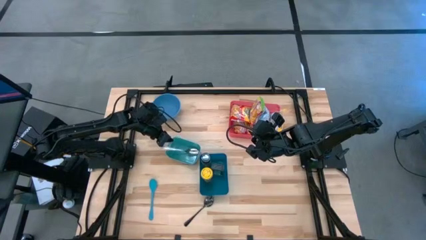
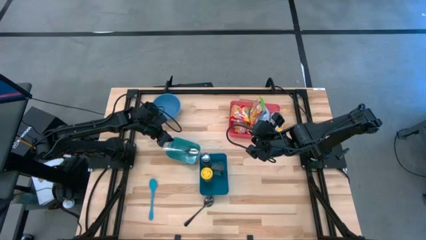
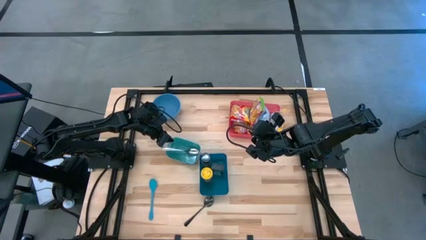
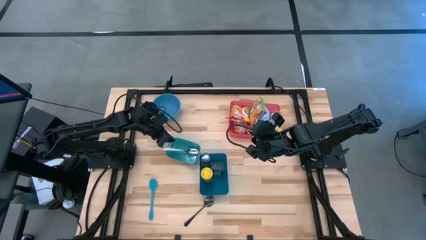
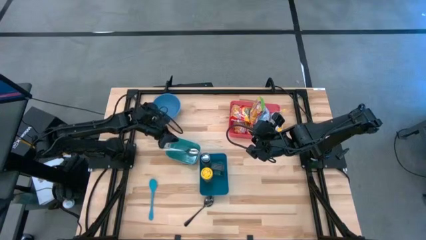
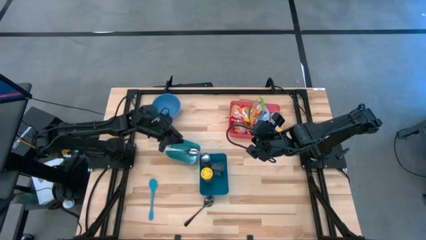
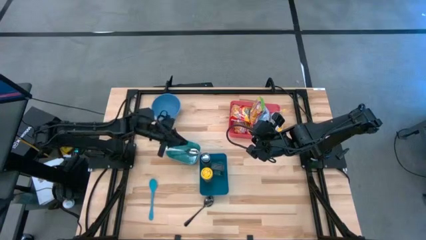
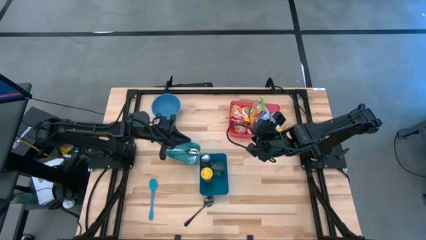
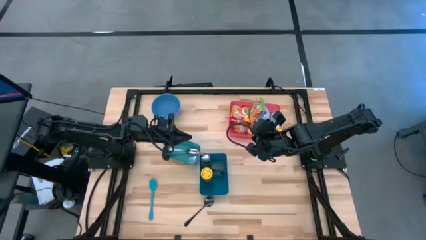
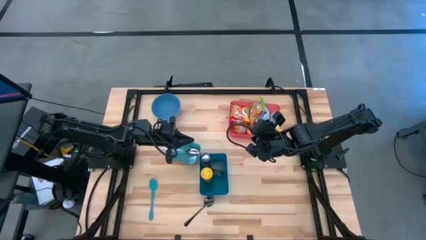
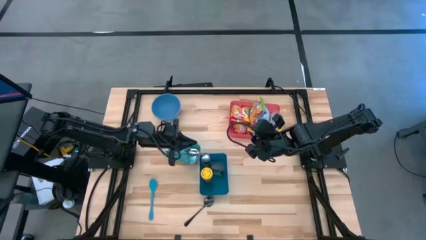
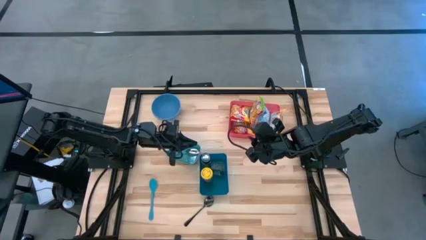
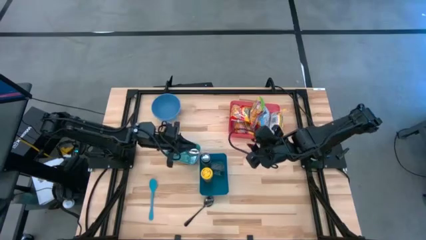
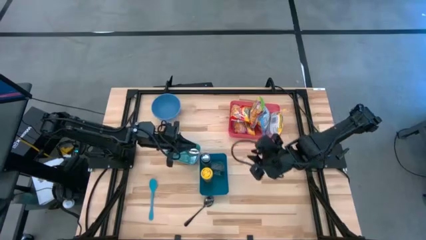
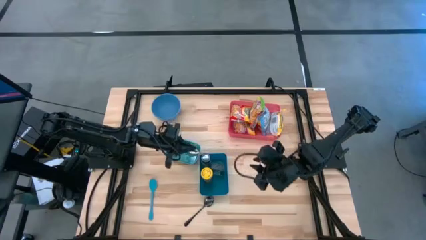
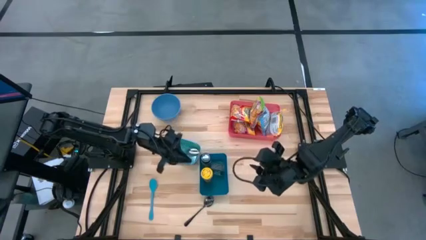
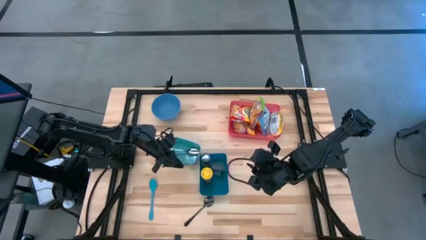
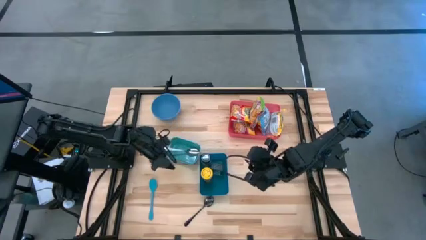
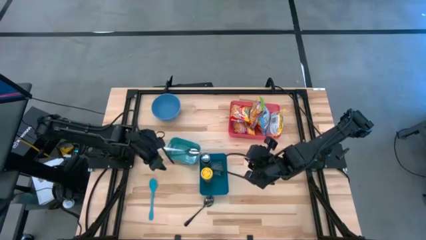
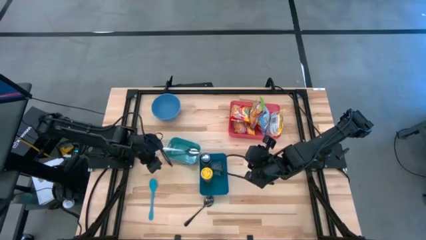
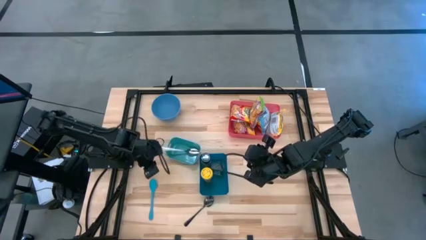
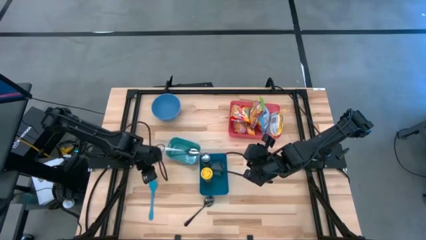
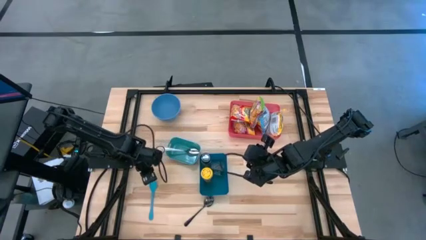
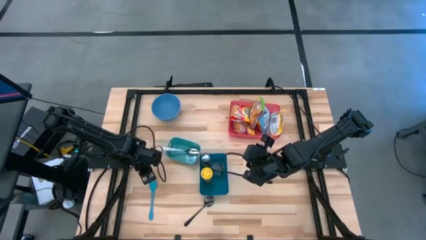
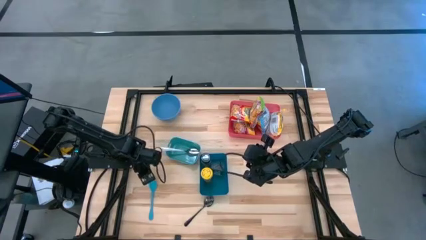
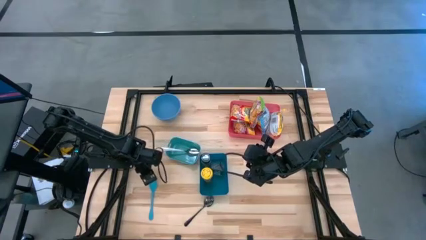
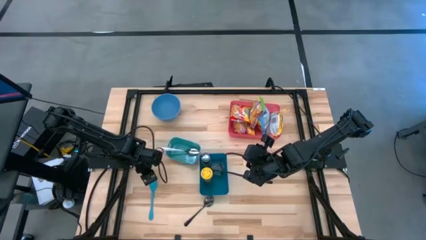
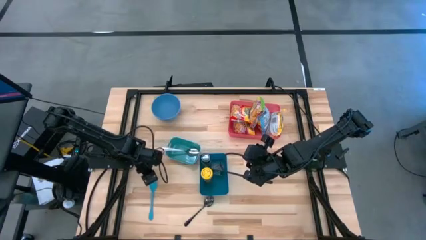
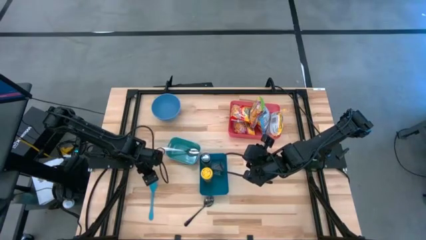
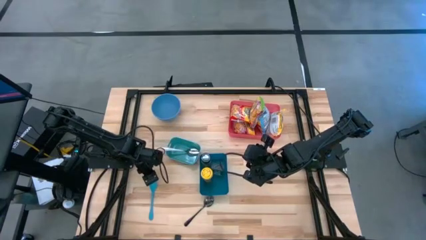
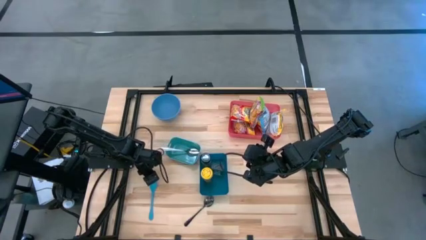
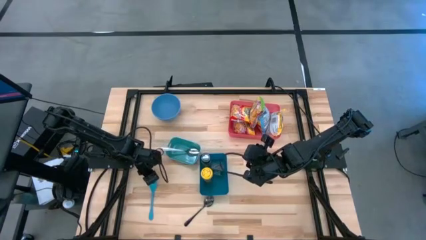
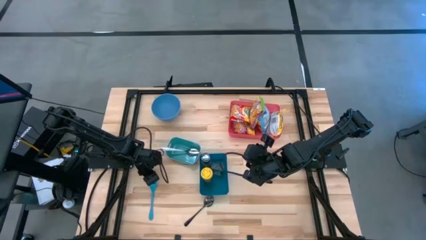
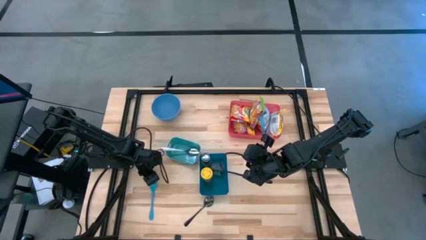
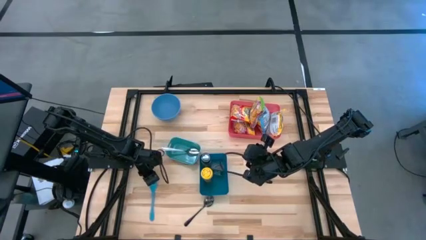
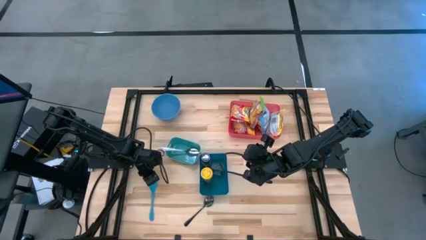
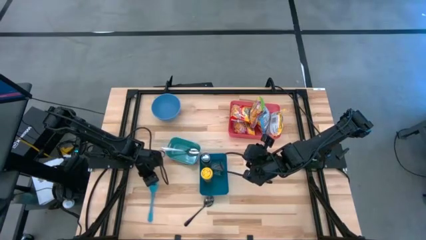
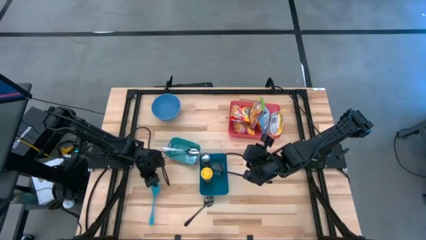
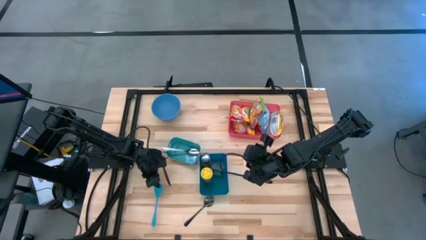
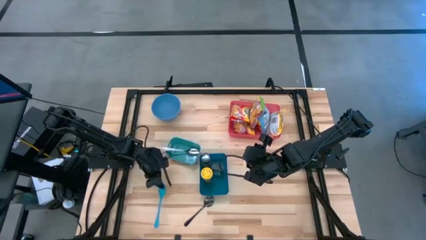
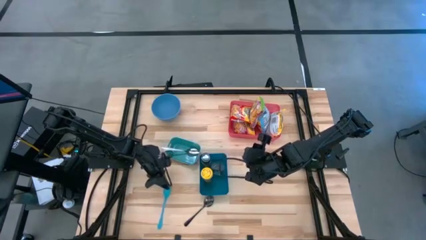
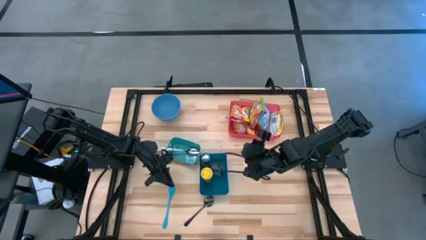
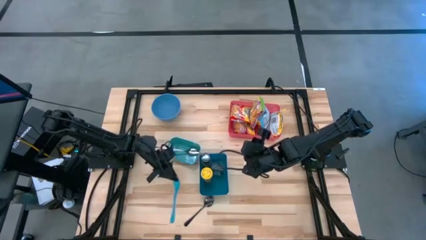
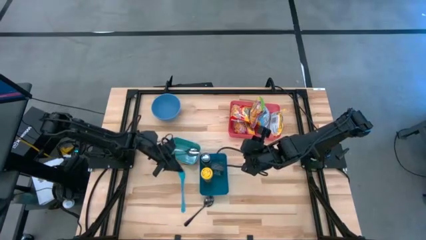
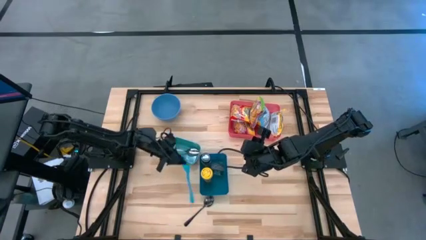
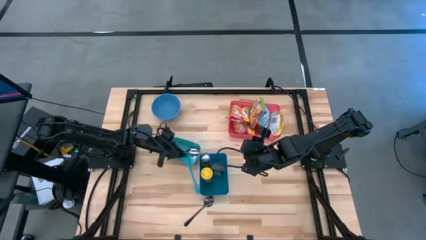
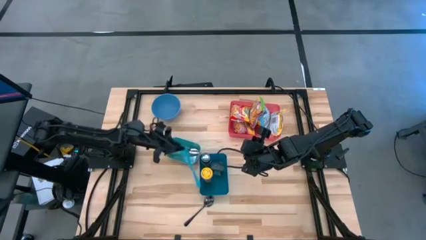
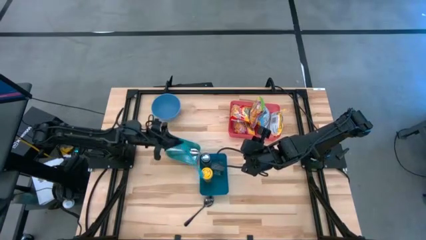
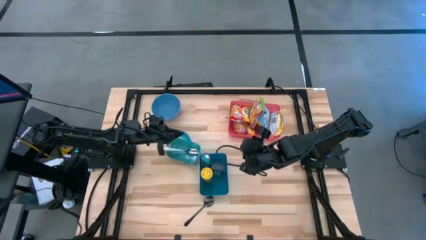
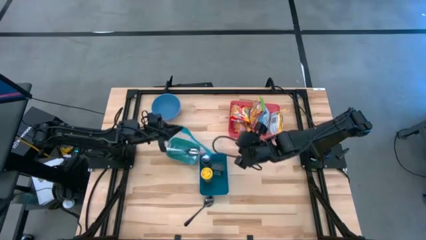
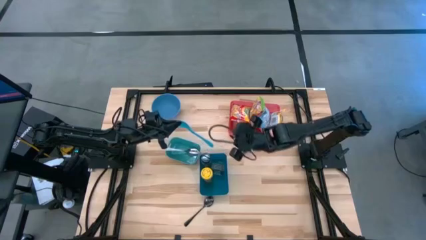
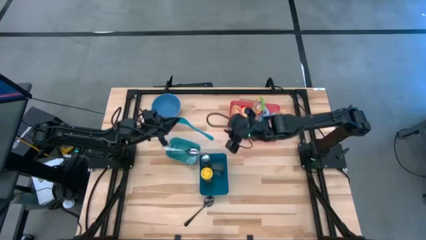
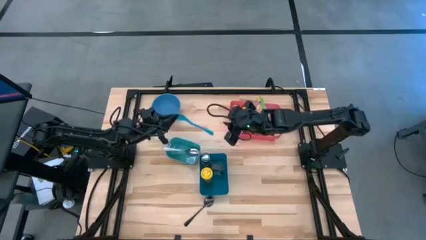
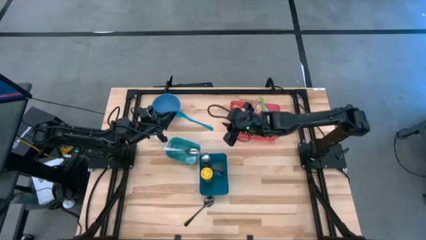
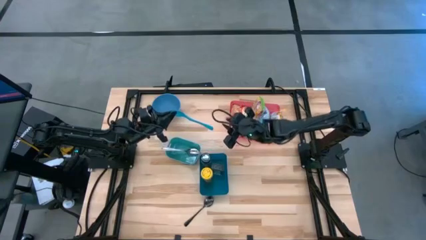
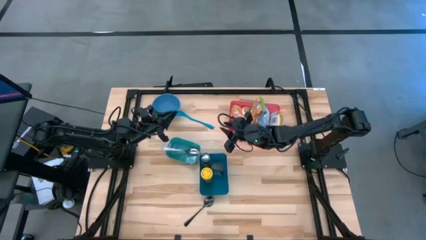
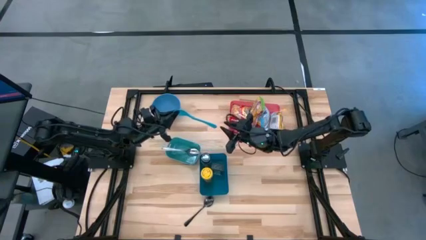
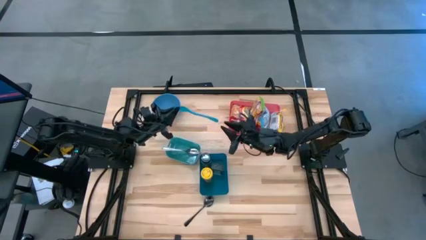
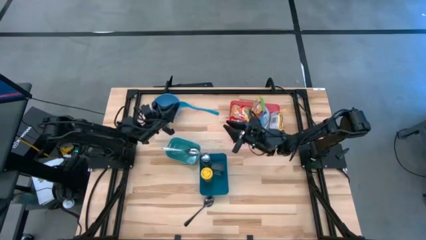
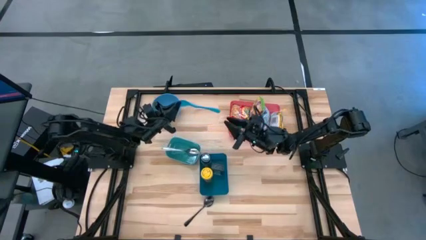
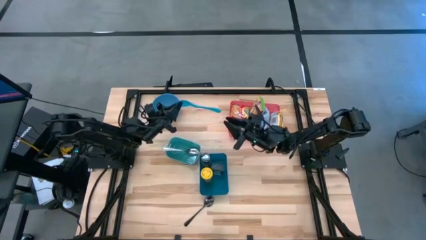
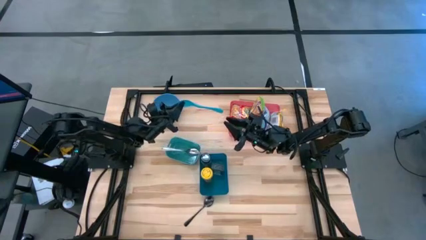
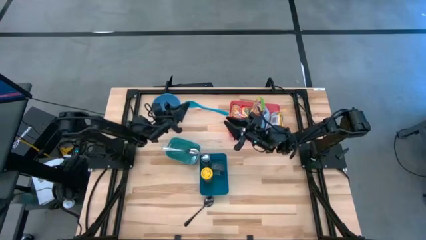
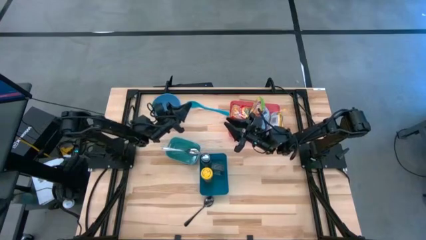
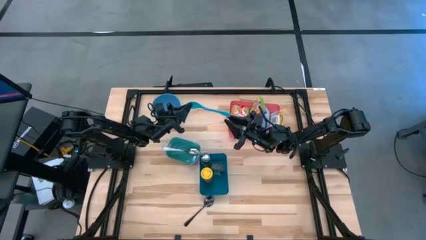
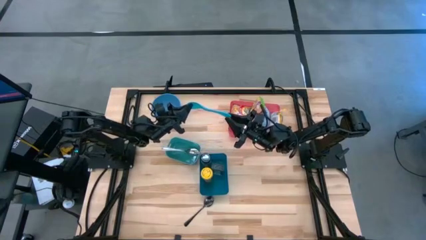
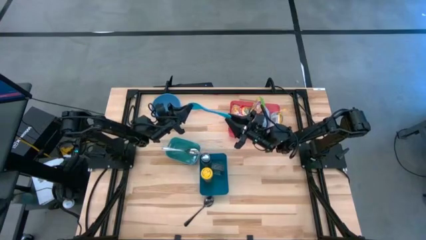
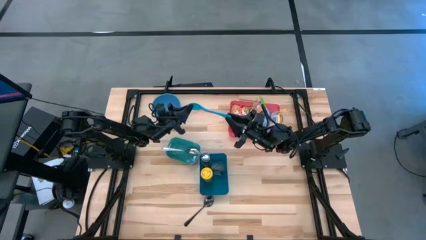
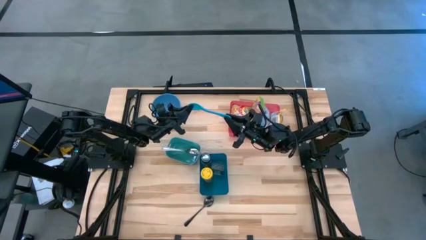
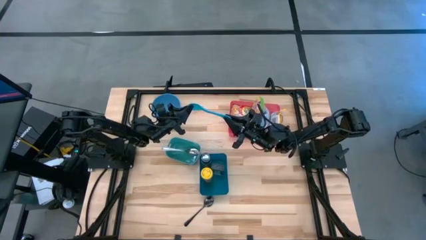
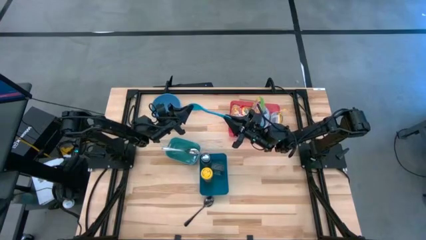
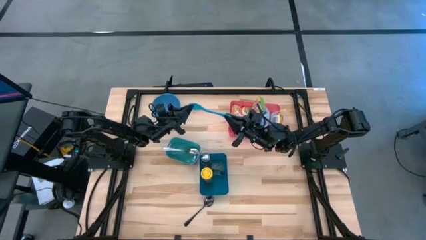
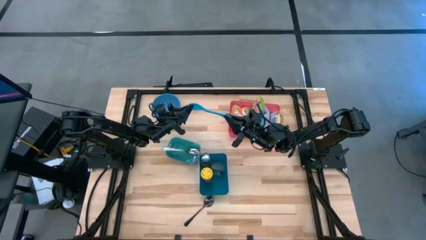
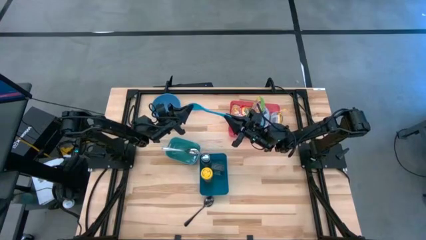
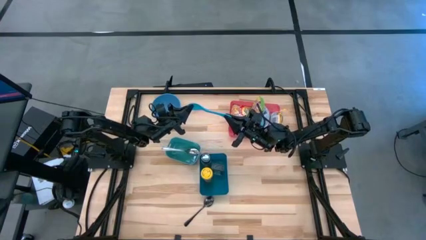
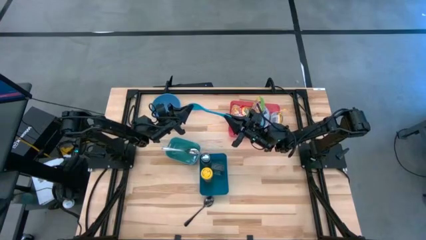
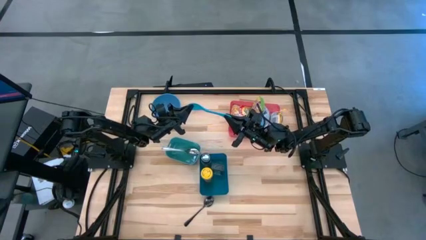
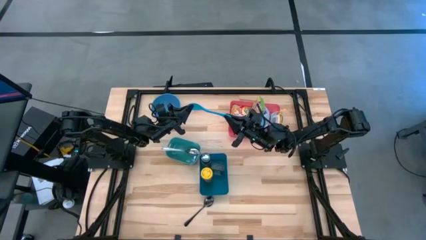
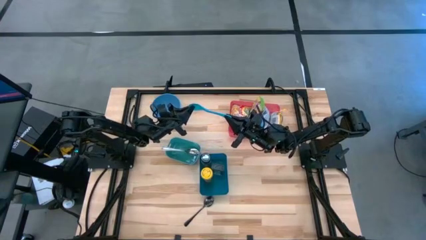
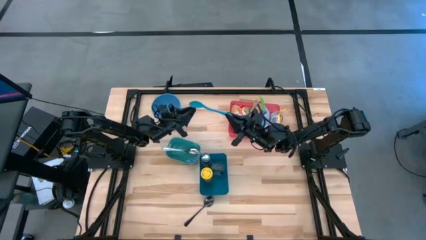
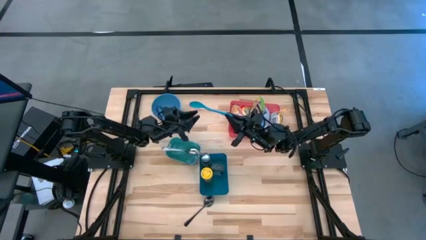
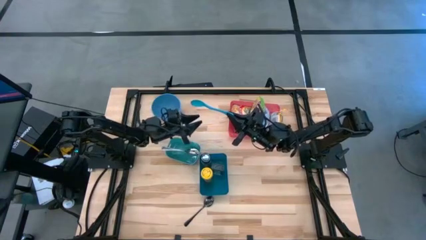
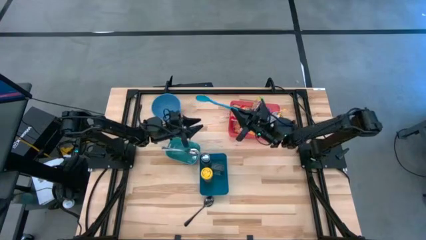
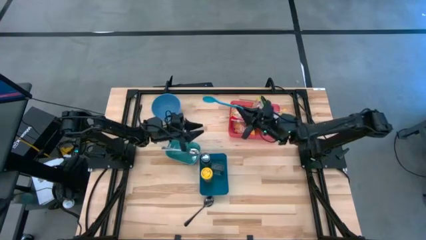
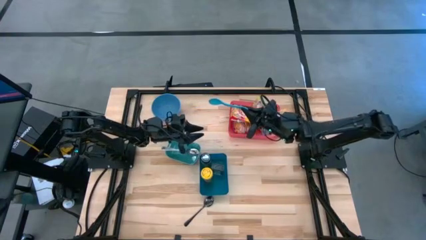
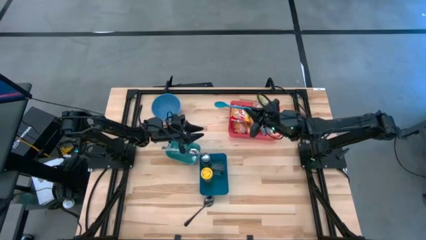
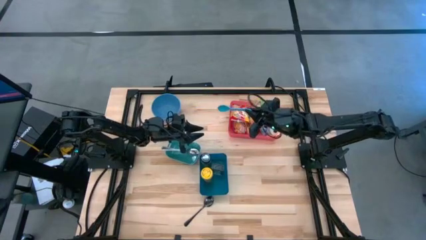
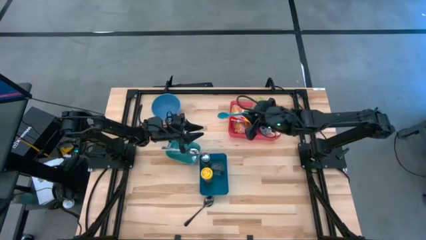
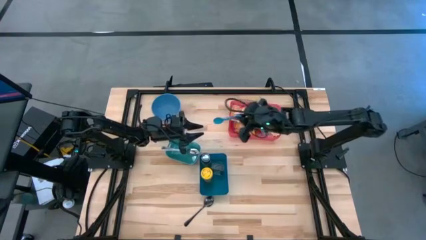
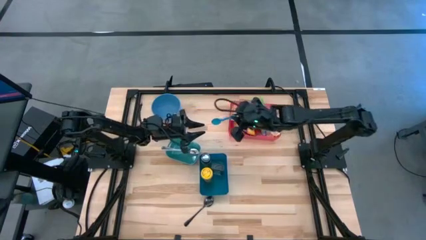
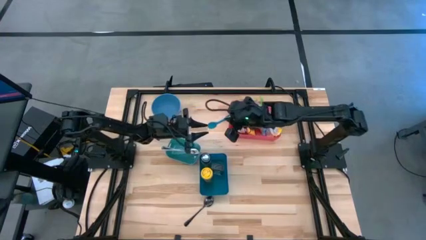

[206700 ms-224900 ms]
Task: Pick & Place Food Item
Put the blue baby spoon into the green bin
